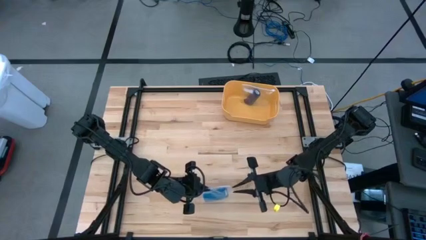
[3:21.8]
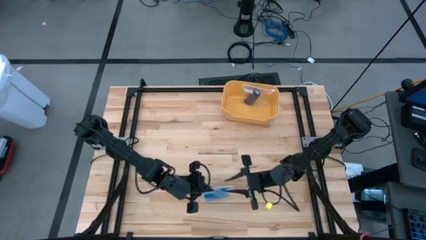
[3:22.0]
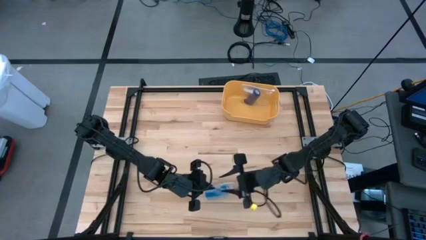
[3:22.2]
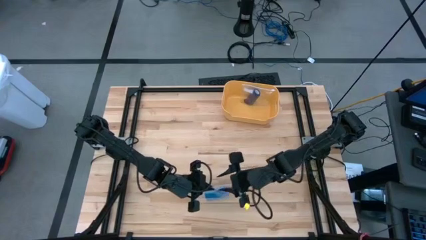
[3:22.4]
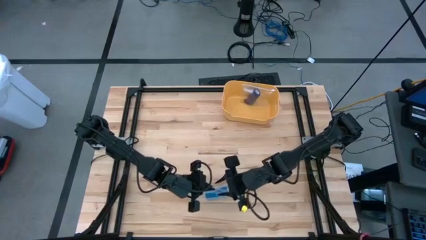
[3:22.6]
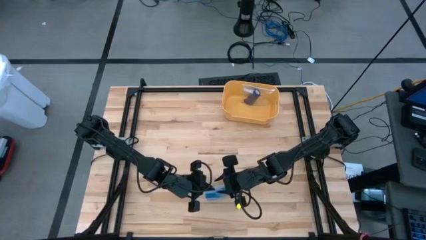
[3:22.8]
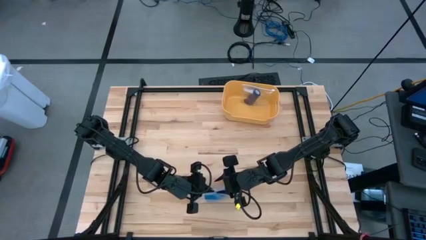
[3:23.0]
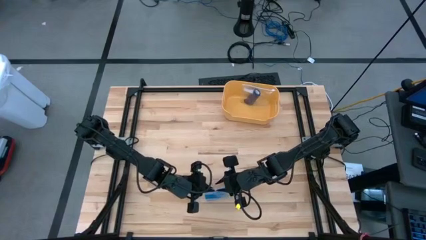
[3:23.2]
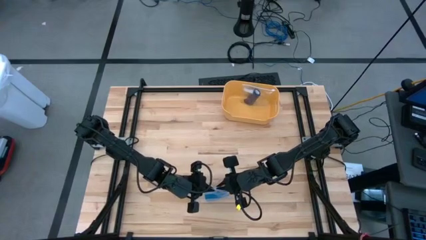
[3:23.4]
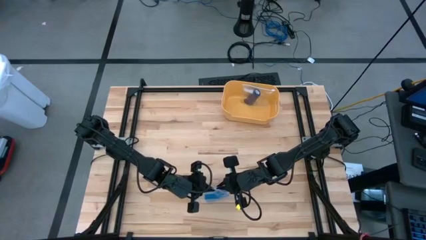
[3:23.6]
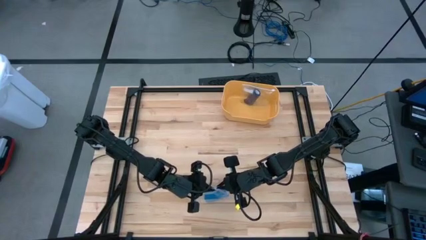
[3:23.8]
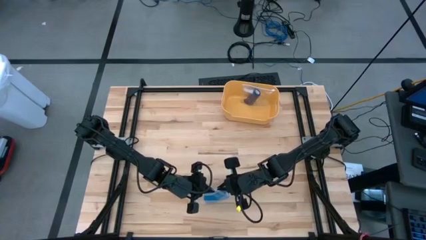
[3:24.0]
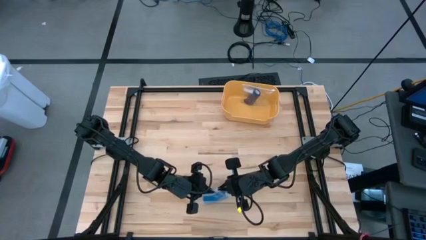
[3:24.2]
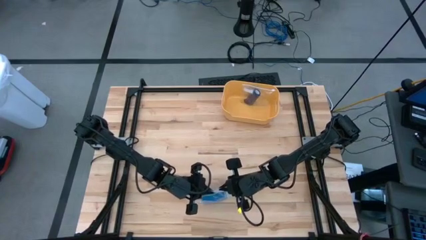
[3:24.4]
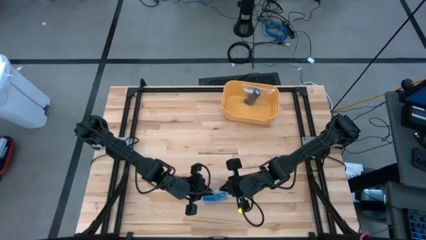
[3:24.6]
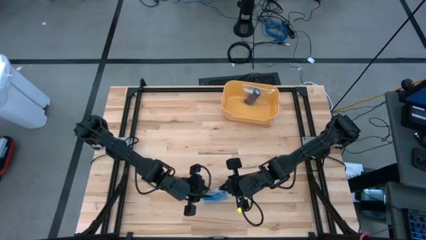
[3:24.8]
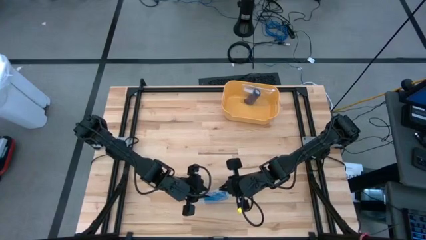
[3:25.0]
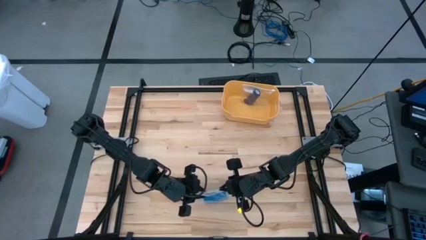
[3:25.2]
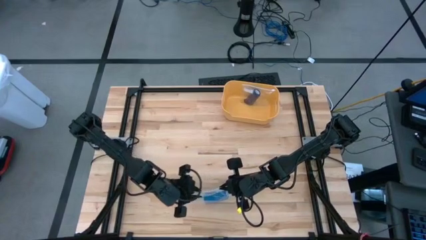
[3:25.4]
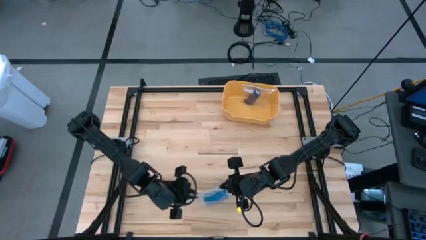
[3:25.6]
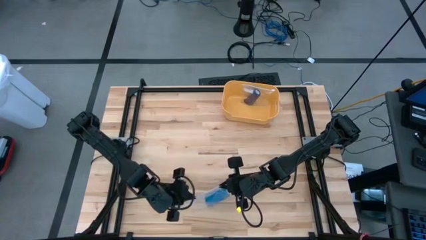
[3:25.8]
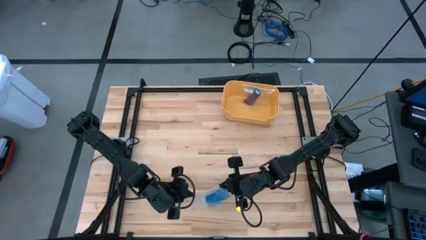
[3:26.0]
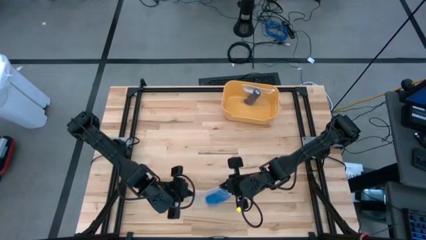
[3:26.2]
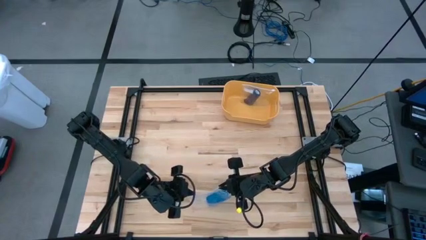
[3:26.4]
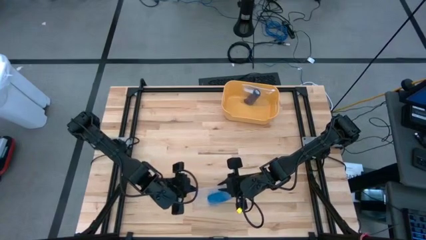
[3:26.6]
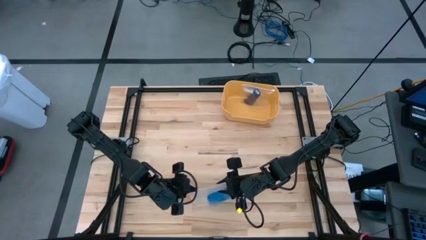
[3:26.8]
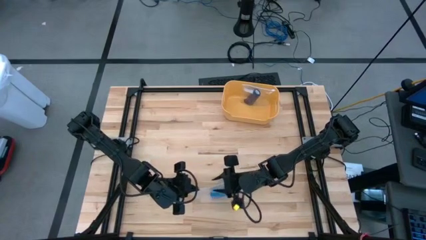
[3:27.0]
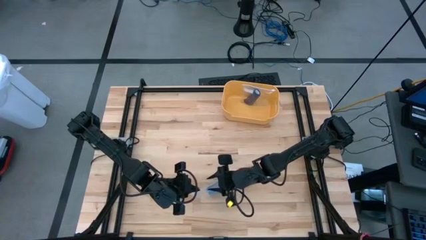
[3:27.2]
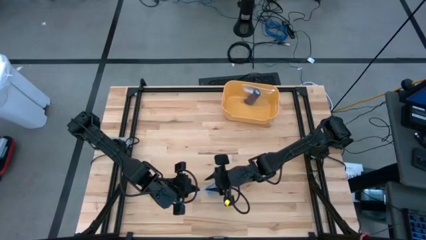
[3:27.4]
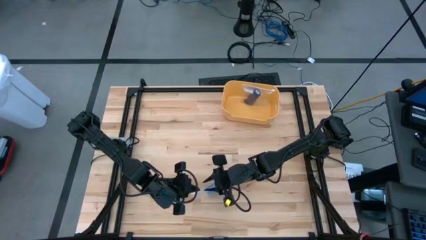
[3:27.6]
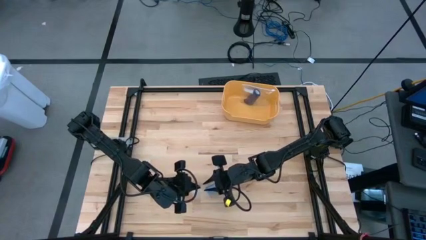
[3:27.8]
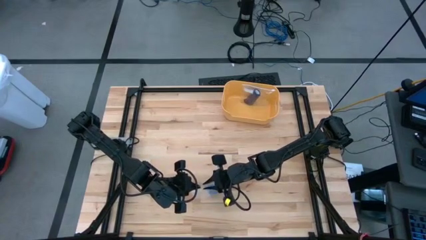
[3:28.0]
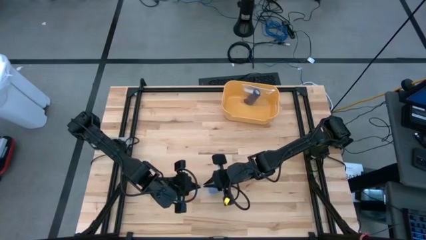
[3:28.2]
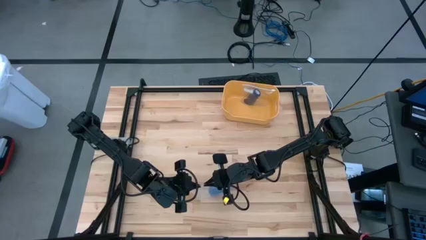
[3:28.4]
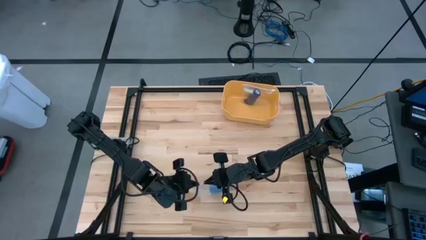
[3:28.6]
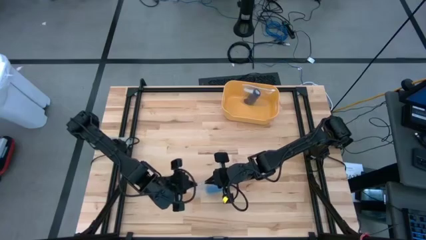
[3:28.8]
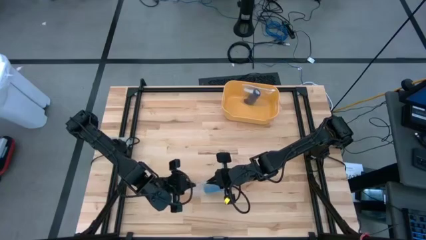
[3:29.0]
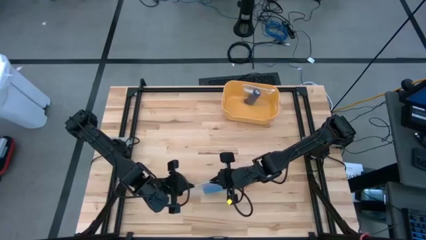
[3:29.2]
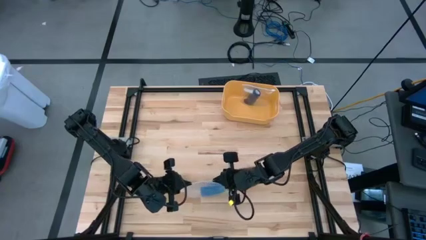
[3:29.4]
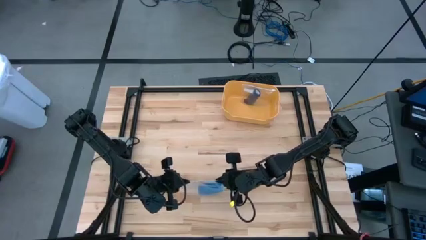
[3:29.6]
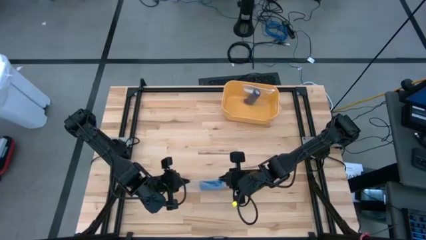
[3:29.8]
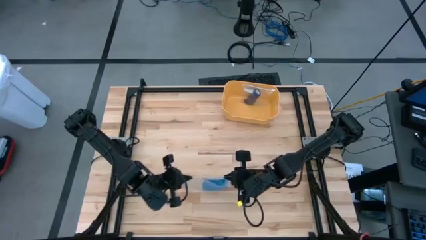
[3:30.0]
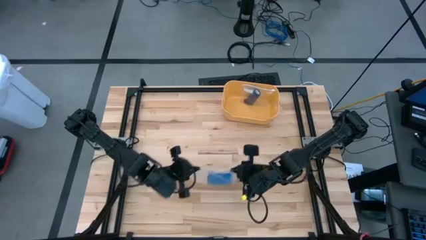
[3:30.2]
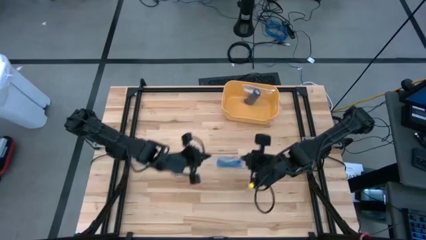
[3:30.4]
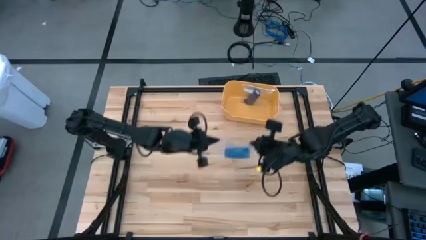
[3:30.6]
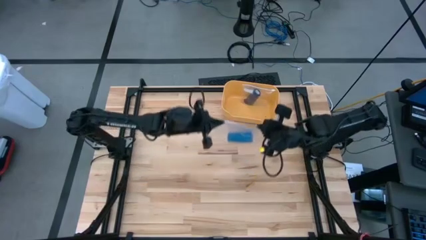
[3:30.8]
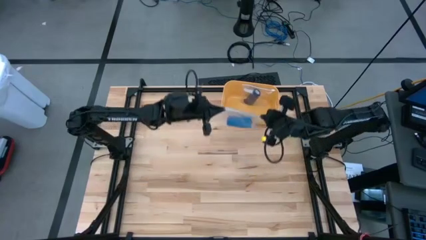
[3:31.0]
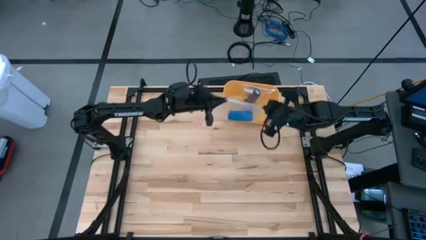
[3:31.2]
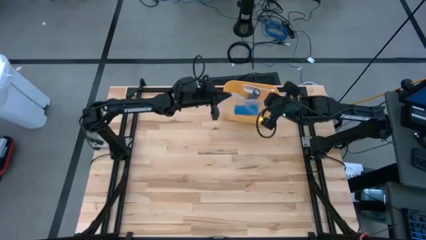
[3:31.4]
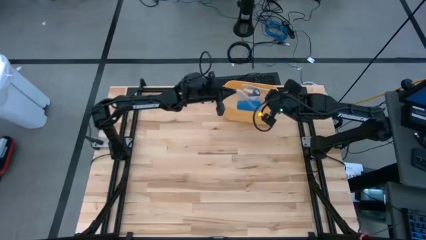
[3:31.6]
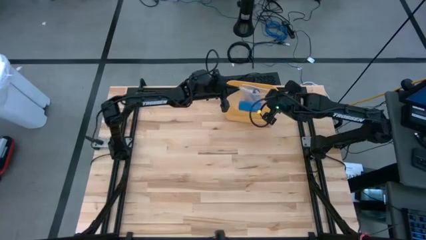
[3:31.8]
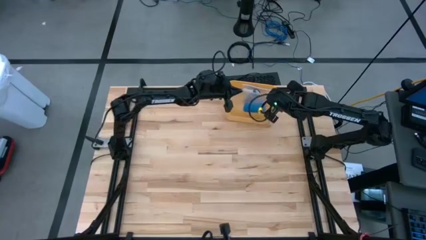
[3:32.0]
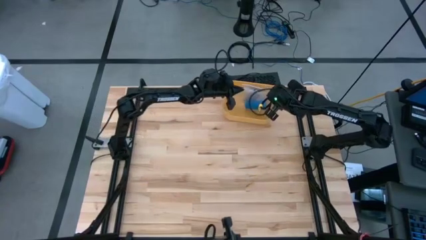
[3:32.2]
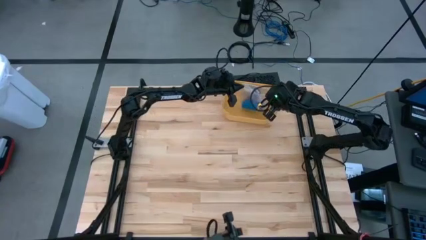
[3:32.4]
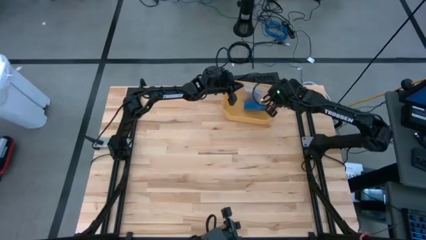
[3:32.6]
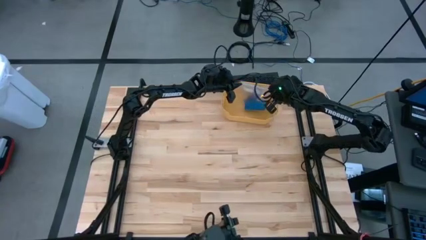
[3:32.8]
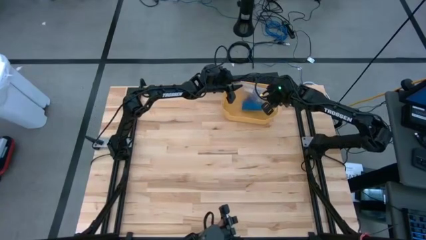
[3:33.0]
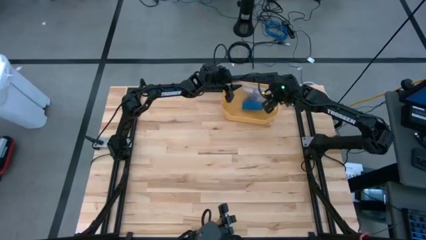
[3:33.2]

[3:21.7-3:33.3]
Task: Roll bandage
Put the transparent zip bag into the yellow bin

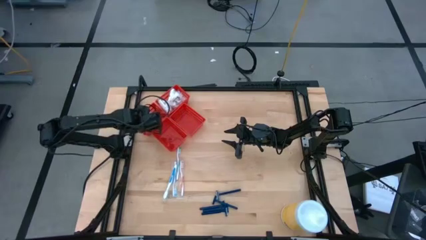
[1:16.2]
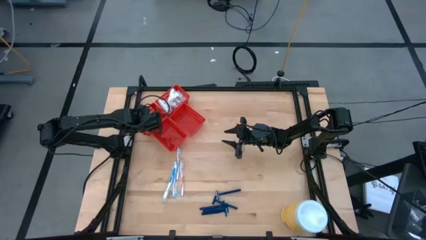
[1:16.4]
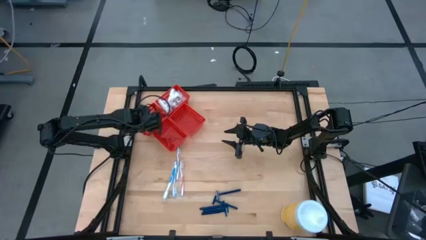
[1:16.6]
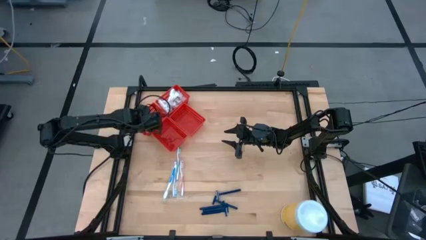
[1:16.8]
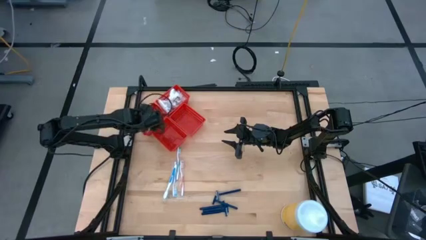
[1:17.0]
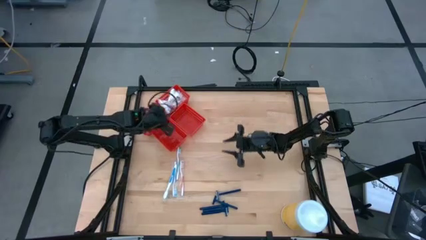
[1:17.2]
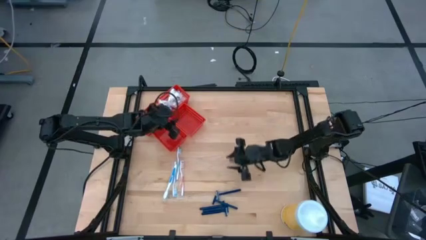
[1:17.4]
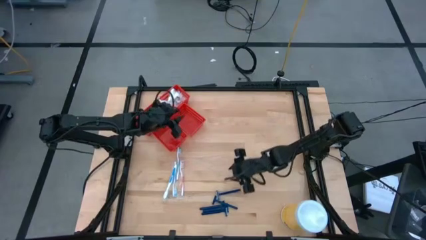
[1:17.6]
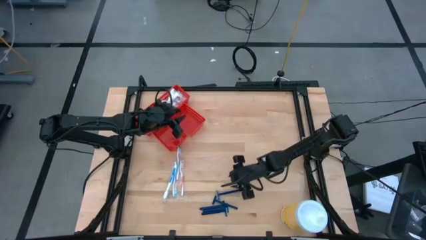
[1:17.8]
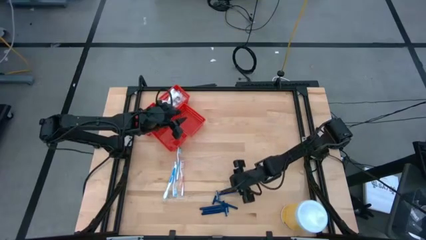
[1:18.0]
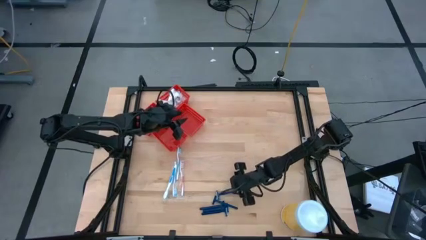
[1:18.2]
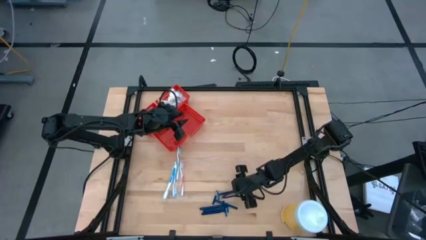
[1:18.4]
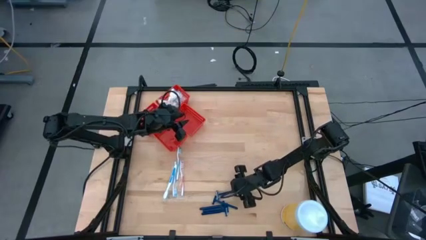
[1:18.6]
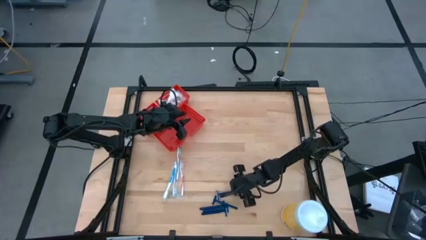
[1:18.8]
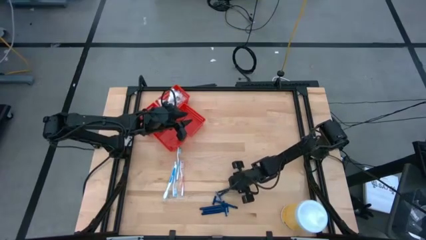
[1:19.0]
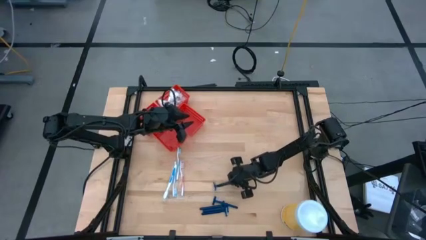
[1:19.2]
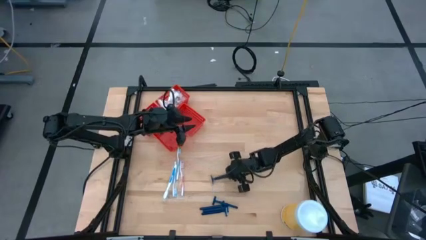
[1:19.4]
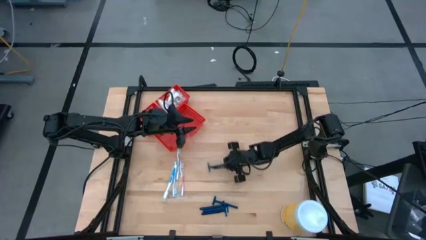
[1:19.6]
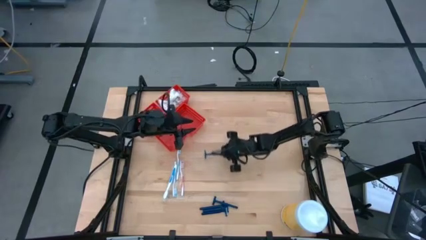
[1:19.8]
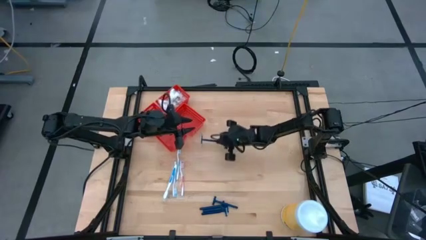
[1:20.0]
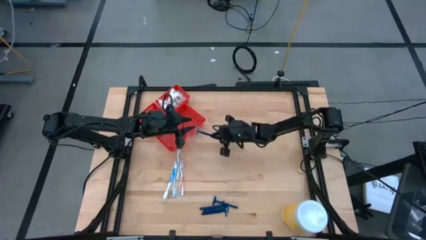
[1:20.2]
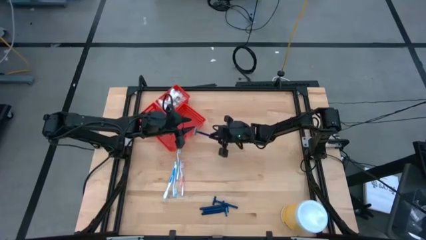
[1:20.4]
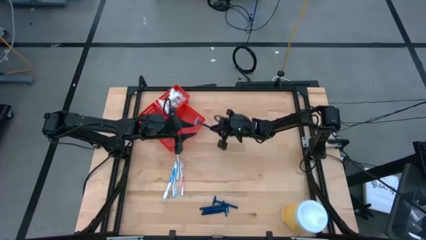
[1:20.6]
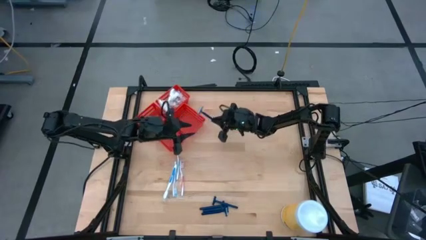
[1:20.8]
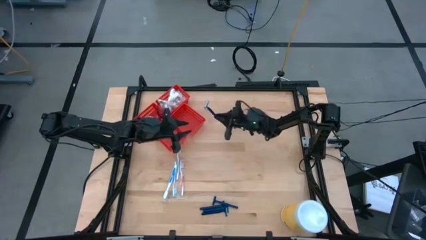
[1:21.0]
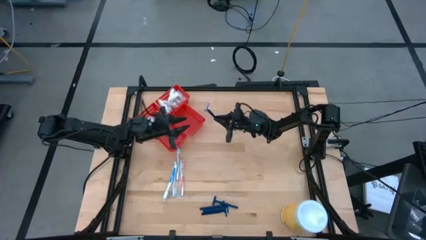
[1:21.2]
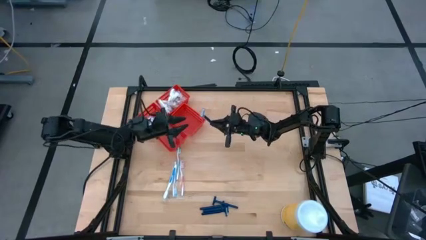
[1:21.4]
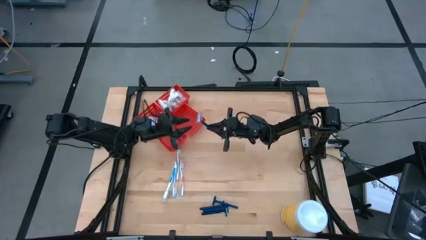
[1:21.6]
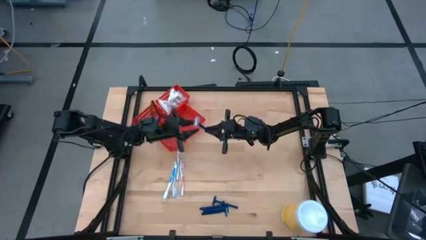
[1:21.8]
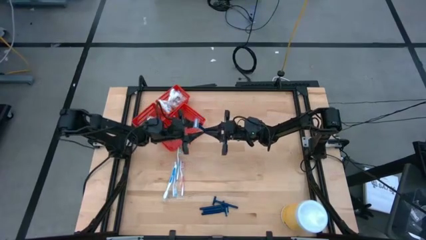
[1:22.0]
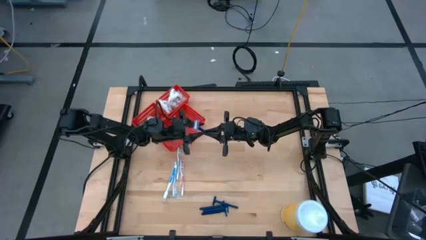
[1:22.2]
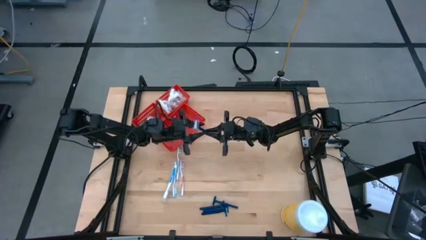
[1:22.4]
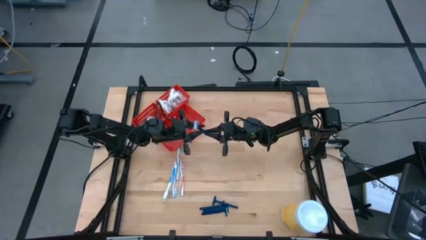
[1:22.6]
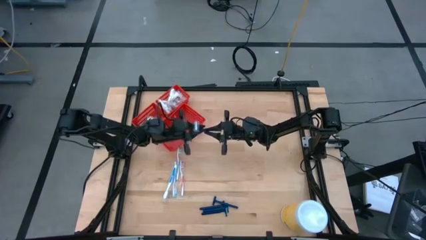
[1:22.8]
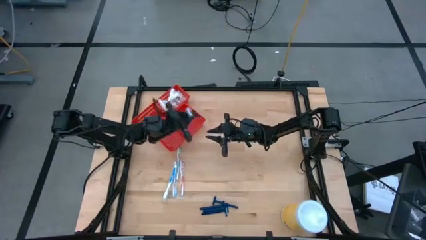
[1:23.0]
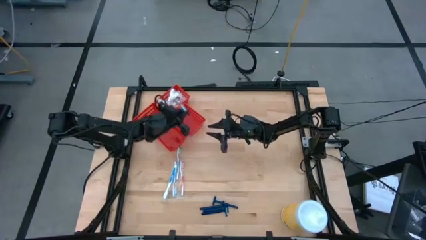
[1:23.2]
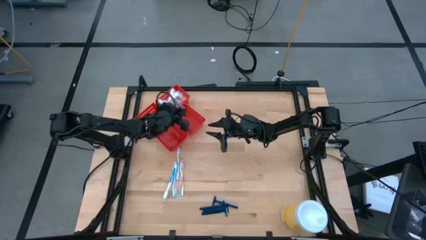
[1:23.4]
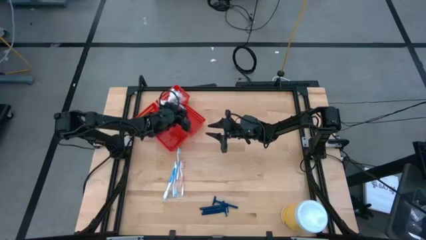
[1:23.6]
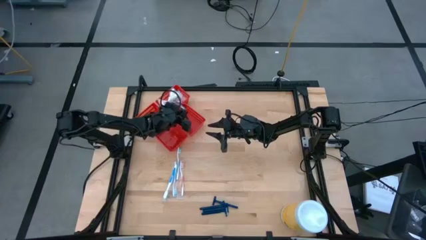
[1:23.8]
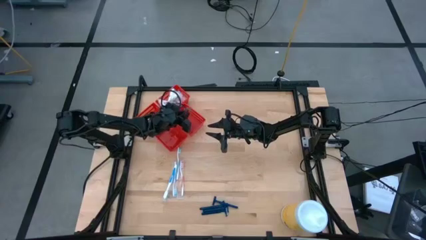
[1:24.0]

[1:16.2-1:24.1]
Task: Pick & Place Travel size toiletries
Put the blue razor into the vertical right red bin
